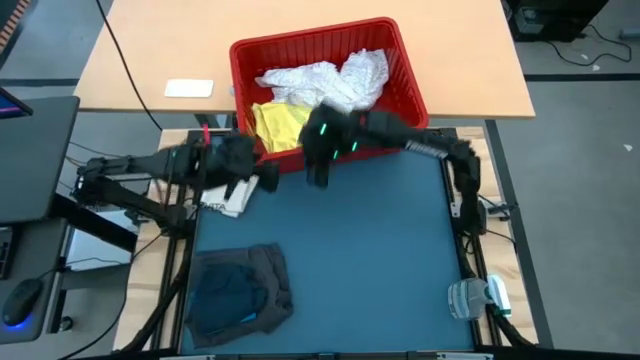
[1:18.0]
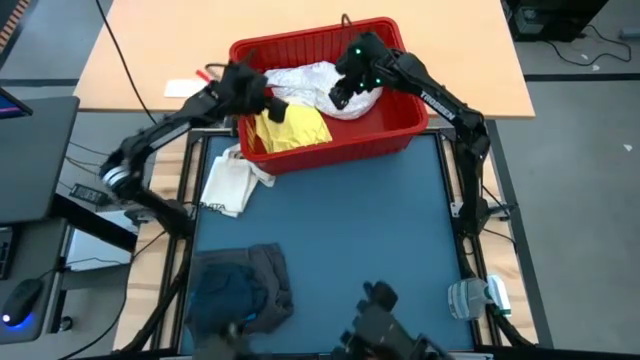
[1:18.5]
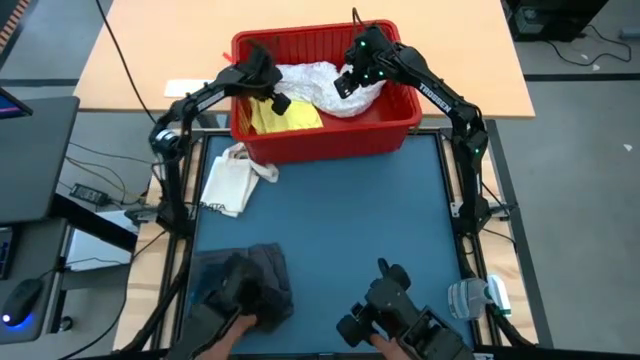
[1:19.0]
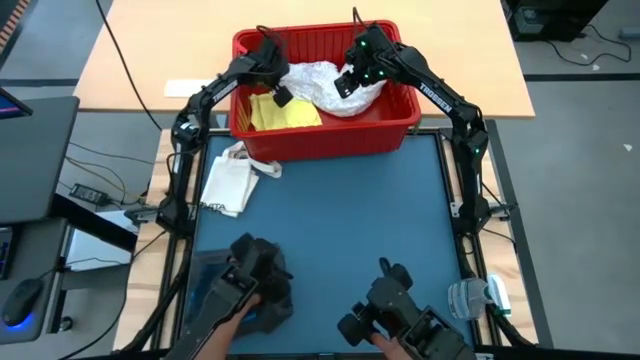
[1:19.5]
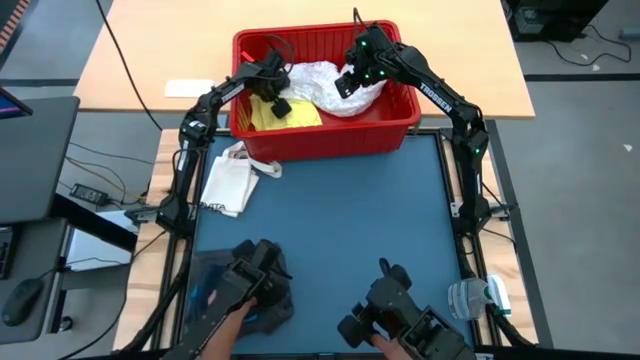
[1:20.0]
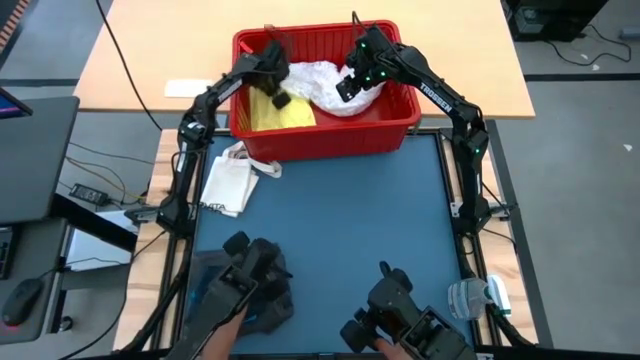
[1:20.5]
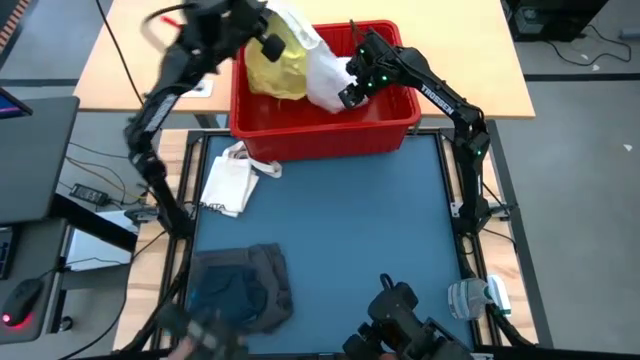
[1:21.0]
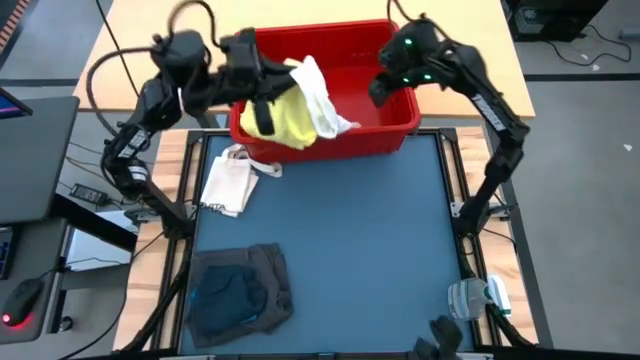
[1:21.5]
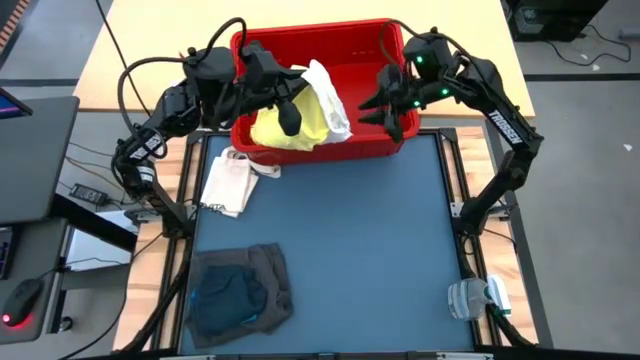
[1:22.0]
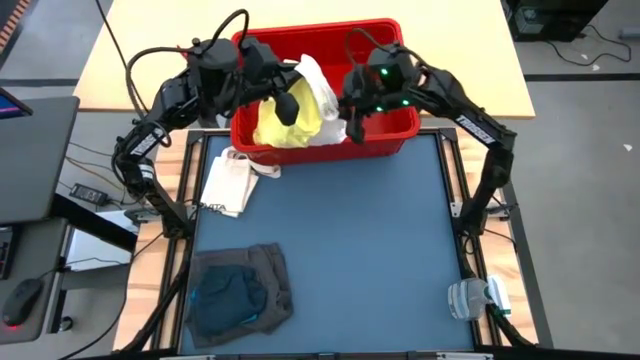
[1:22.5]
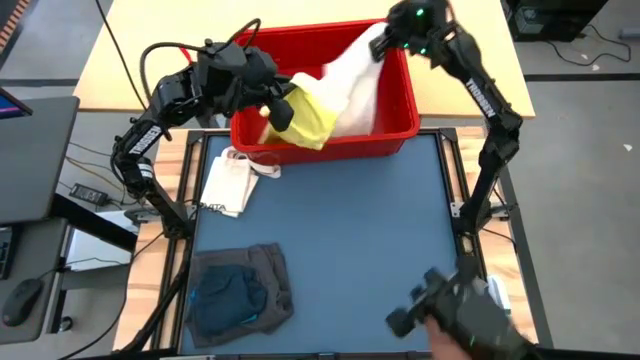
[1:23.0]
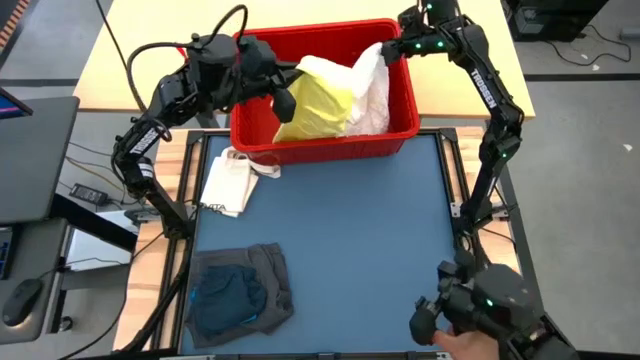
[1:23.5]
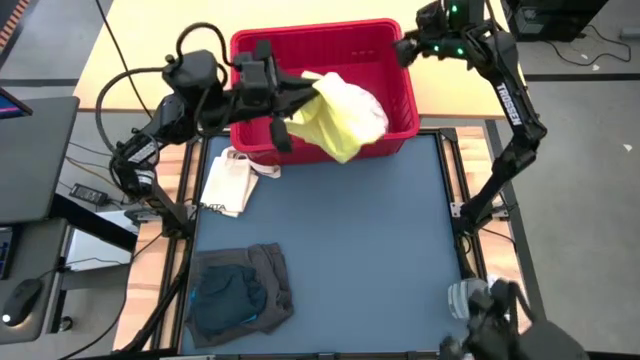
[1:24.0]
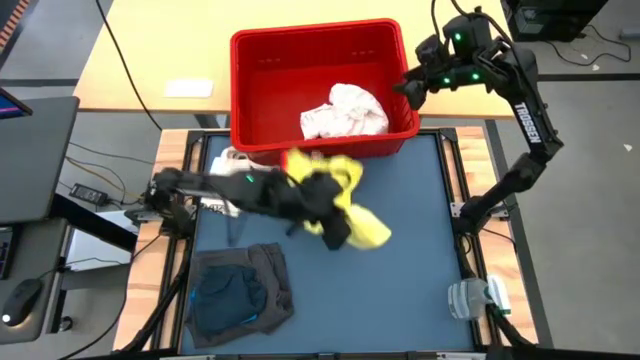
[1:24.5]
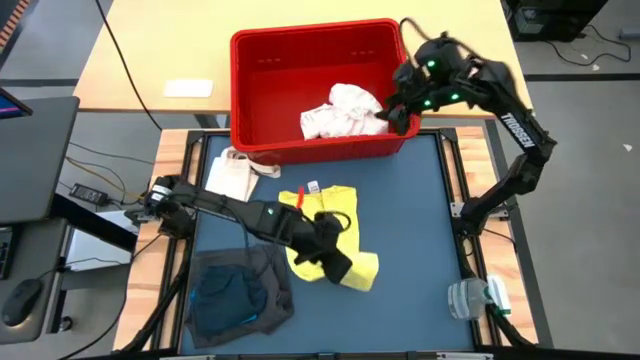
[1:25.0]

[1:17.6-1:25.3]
Task: Fold laundry
Remove the yellow shirt from the red bin

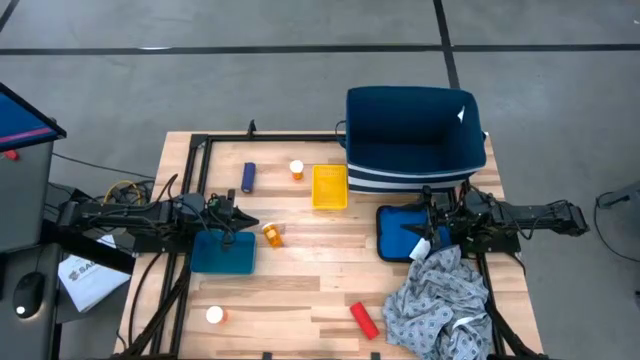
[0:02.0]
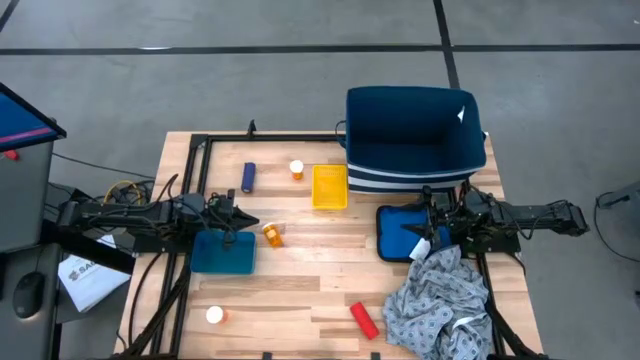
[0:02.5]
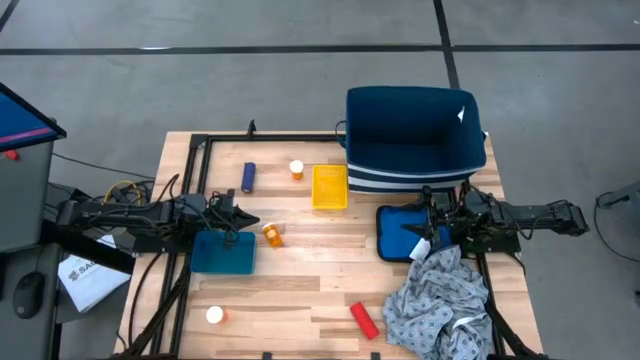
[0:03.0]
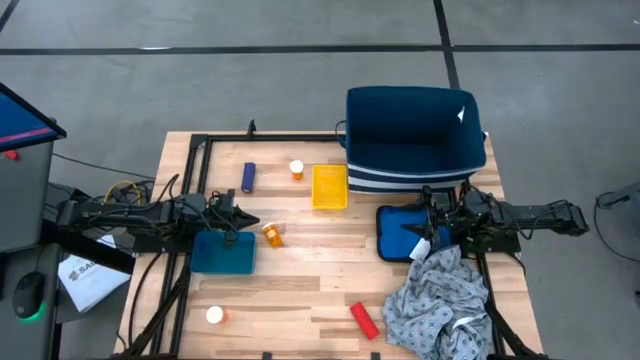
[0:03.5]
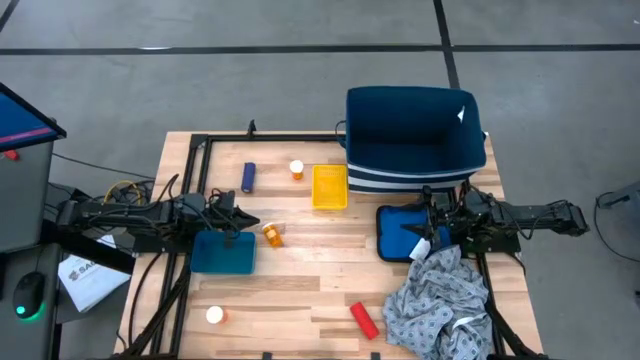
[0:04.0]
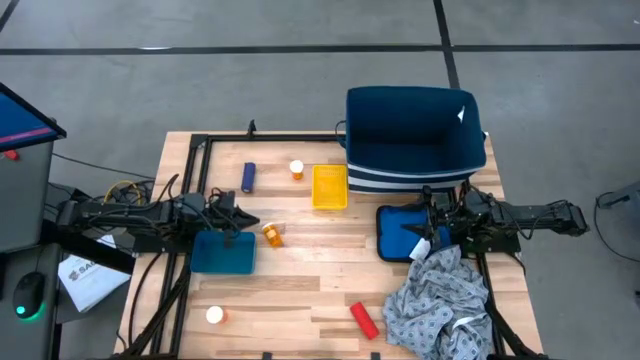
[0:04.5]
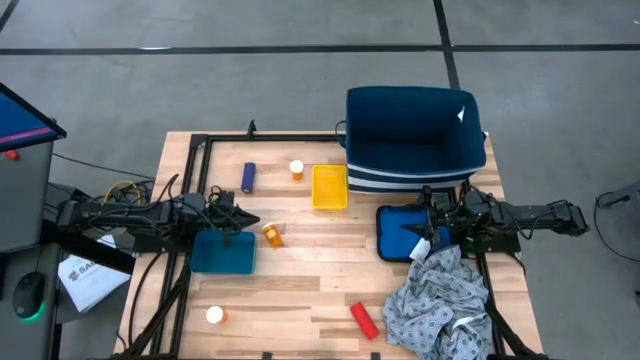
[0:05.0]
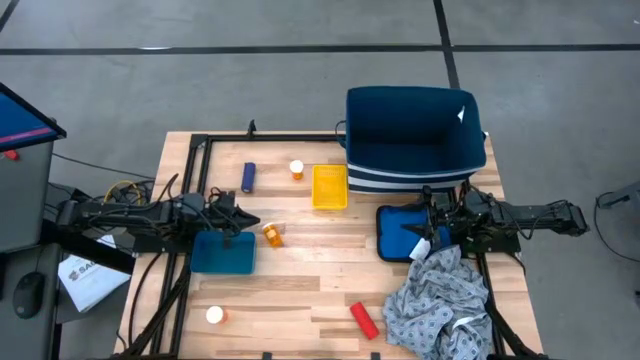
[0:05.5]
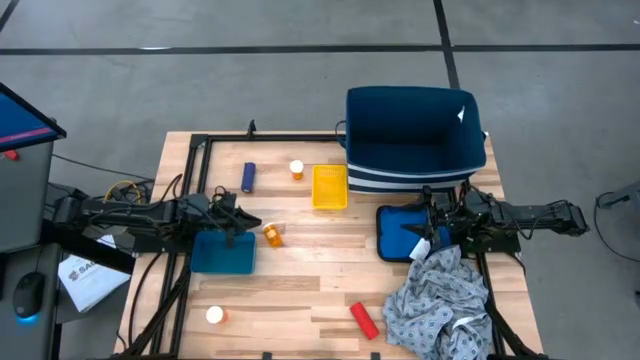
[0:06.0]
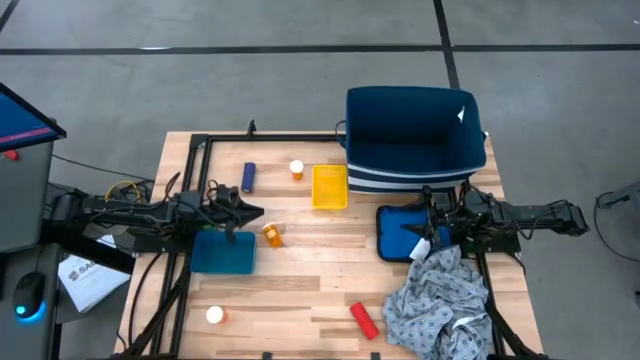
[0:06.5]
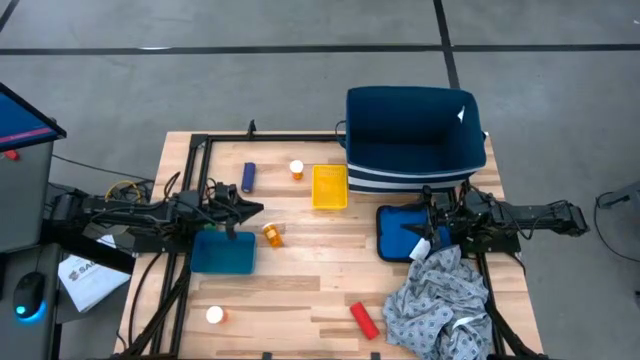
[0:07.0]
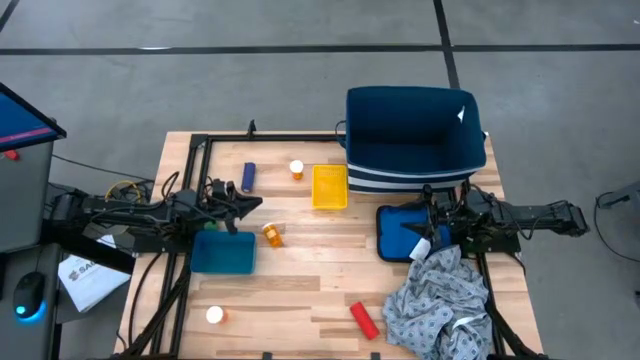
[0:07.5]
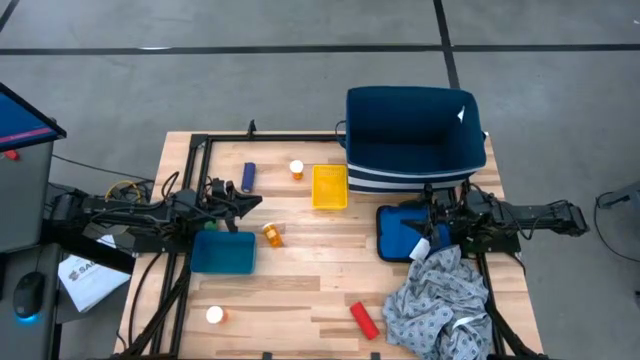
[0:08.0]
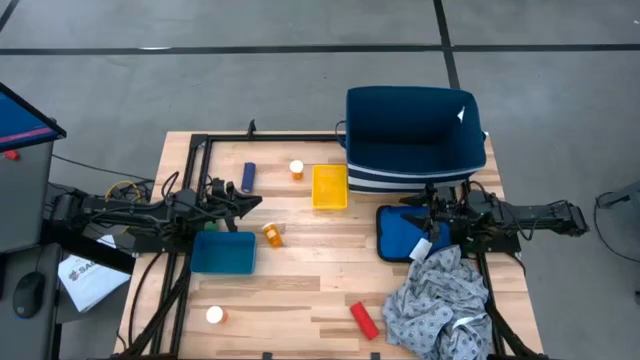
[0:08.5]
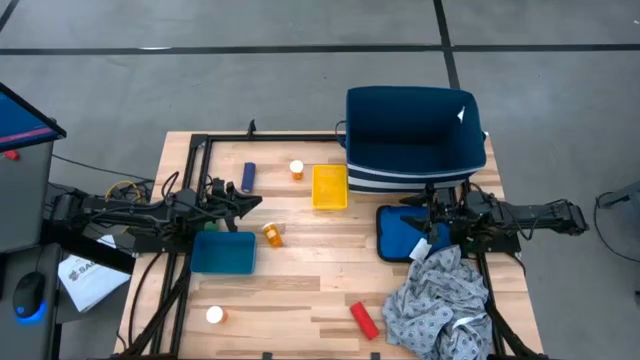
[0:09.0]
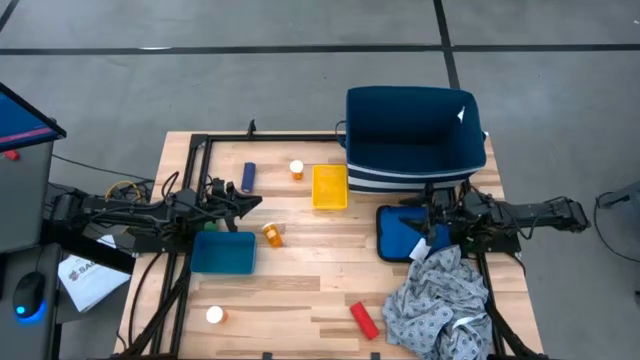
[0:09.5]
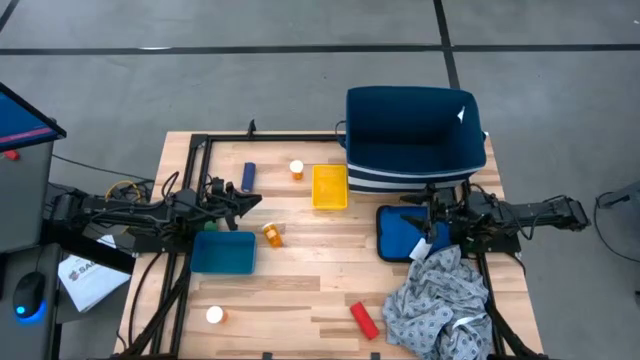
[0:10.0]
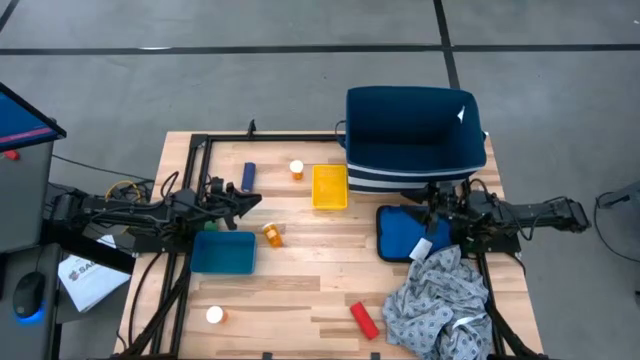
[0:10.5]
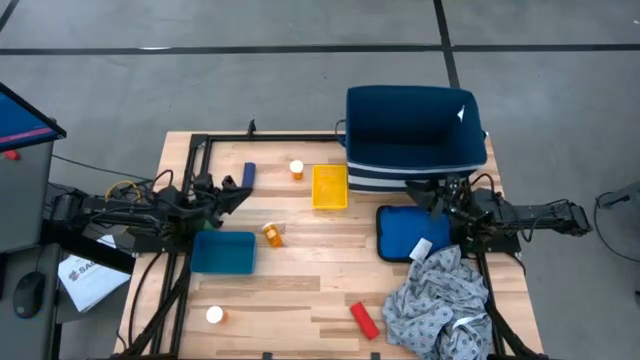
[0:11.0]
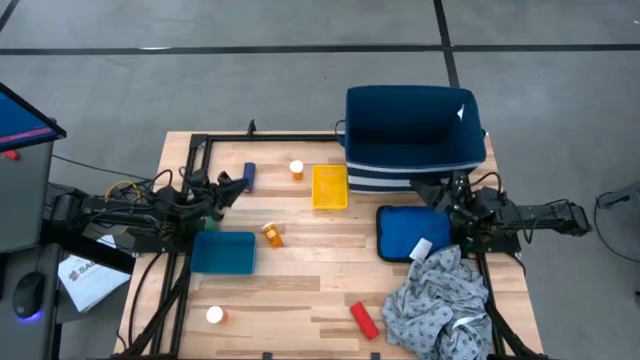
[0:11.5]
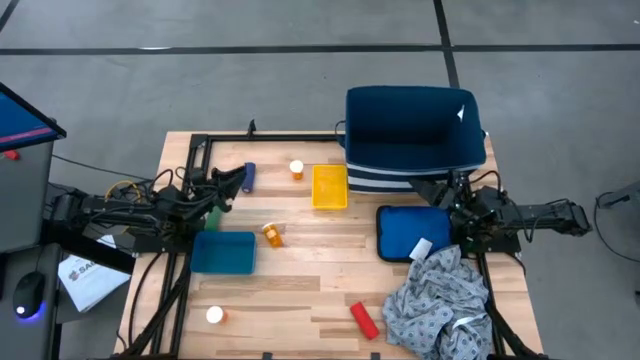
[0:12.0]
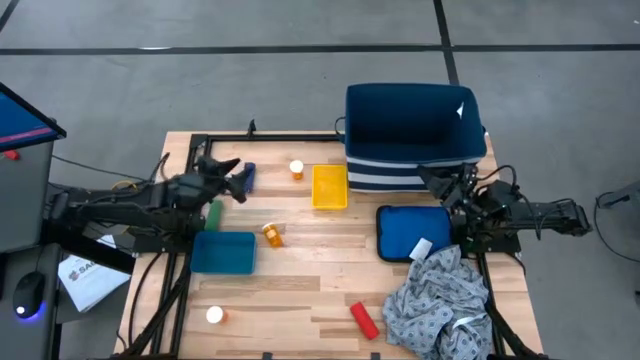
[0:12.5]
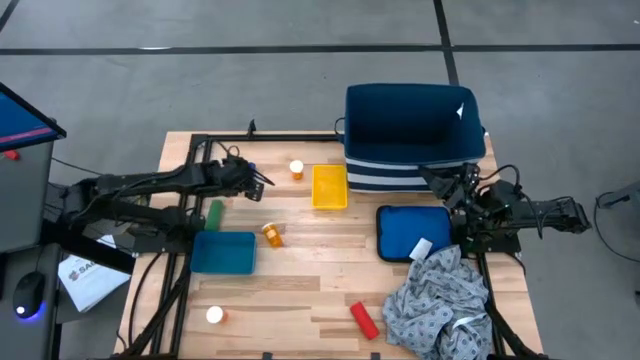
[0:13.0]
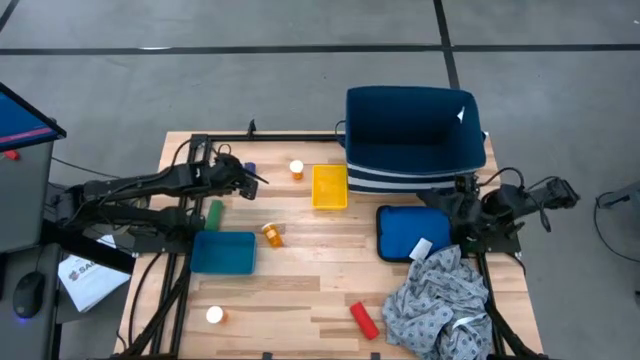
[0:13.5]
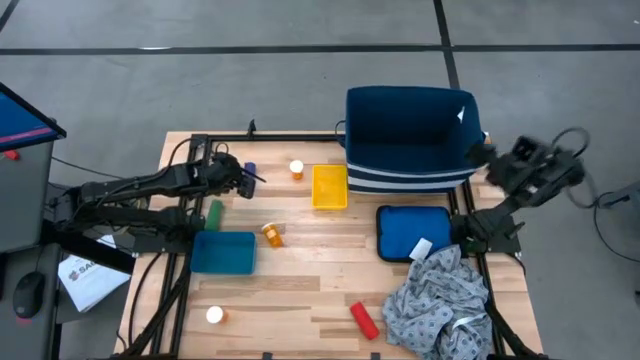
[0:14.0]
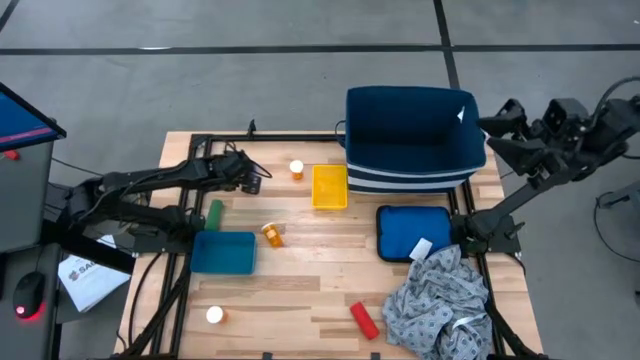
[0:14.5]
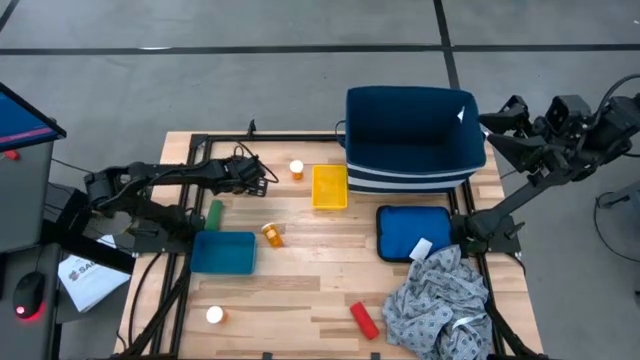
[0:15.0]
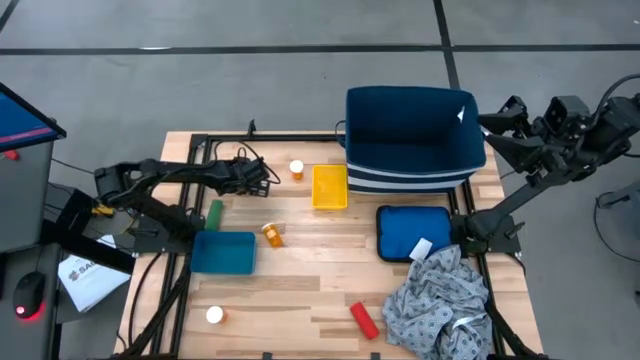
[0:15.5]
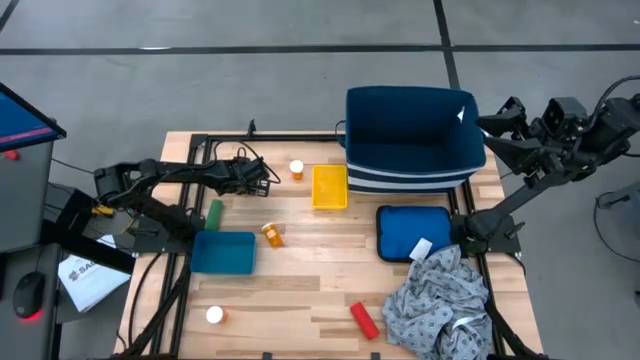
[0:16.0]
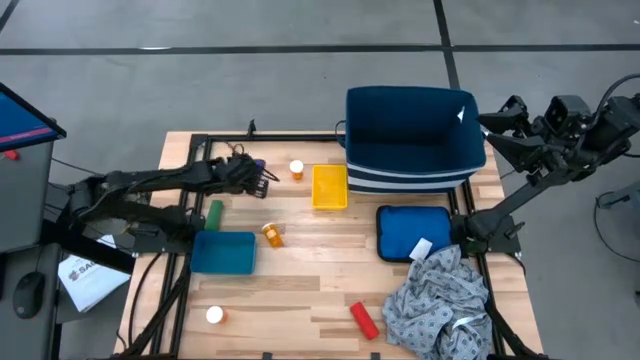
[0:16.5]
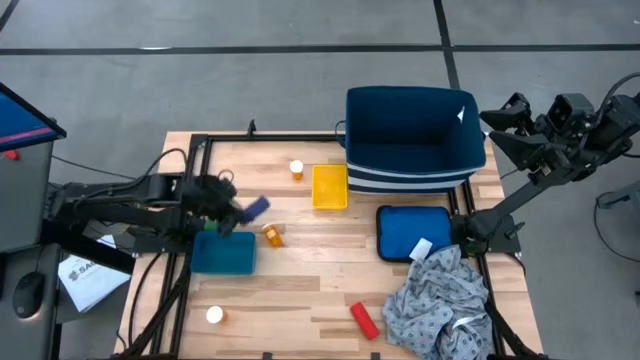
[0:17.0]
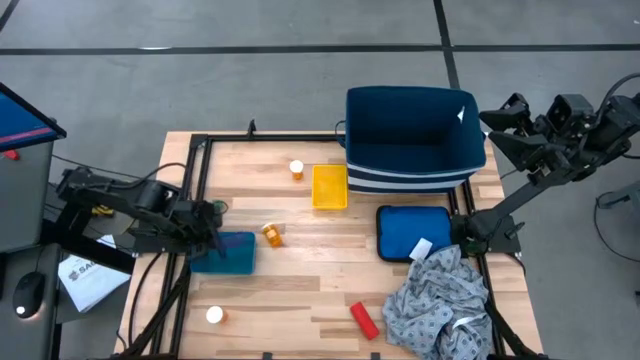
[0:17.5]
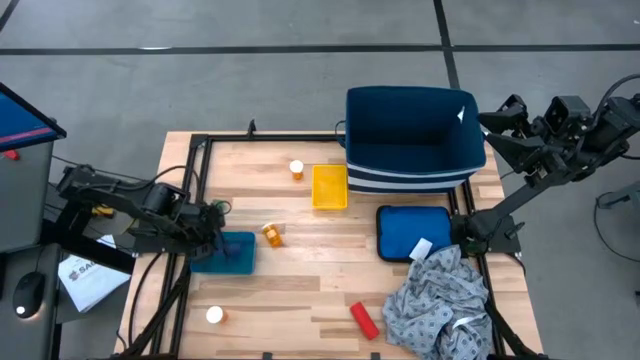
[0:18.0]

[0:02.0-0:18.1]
Task: Pick & place medical supplies in basket/bin
Put the blue bandage into the blue bin
